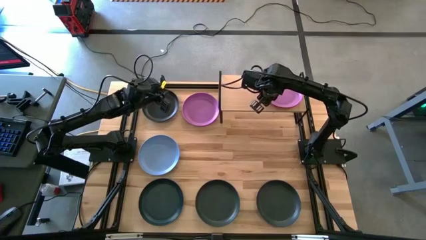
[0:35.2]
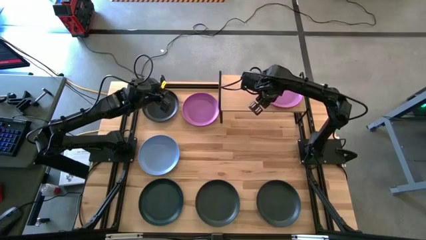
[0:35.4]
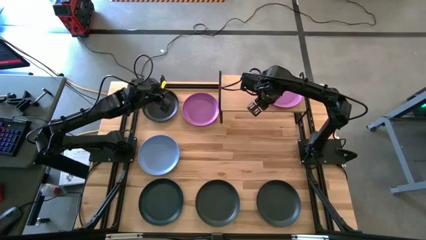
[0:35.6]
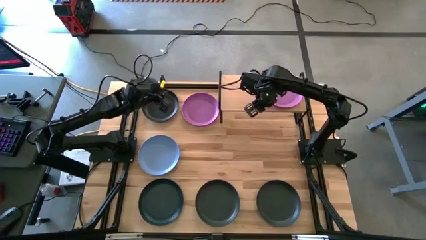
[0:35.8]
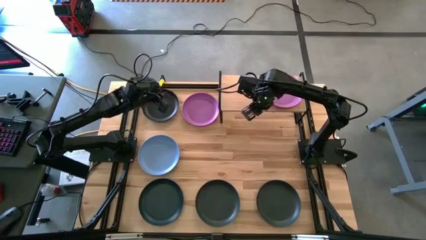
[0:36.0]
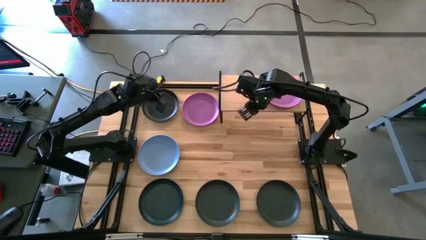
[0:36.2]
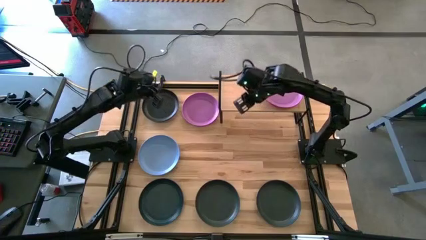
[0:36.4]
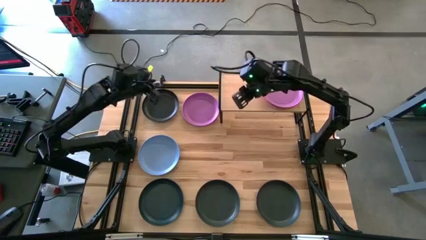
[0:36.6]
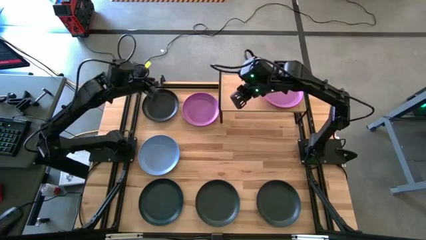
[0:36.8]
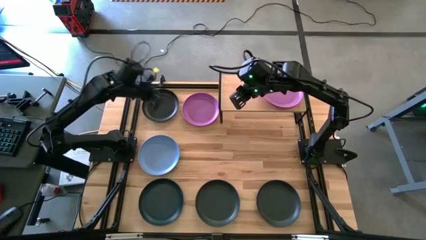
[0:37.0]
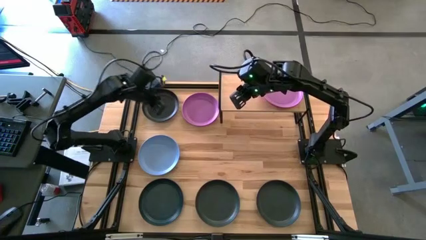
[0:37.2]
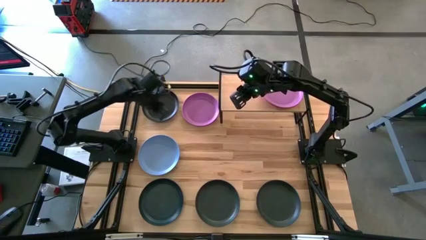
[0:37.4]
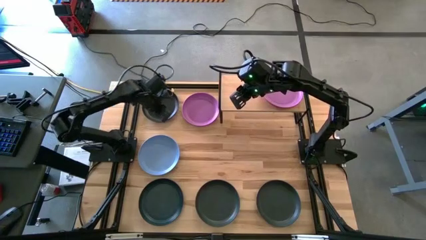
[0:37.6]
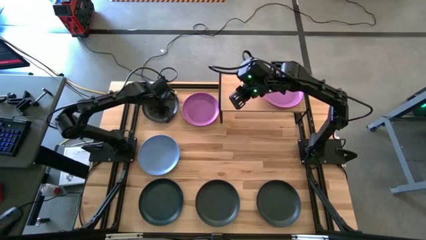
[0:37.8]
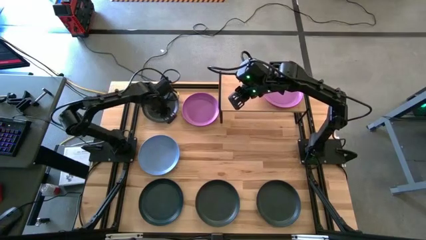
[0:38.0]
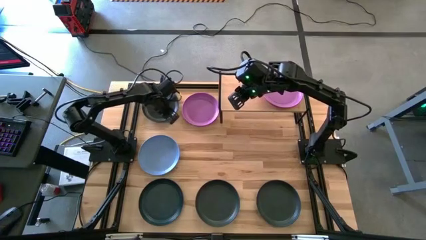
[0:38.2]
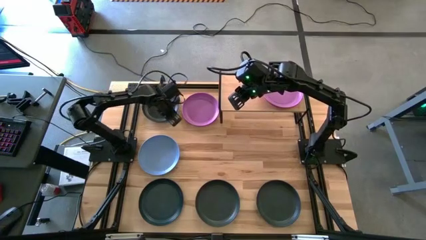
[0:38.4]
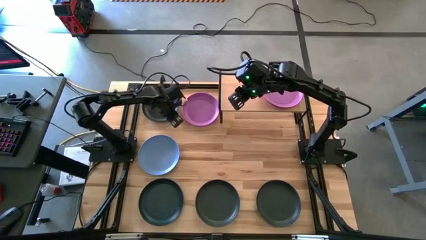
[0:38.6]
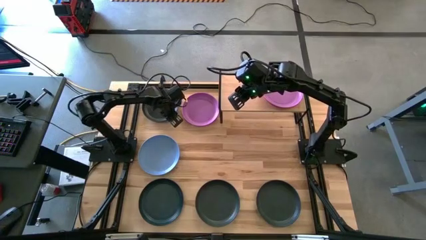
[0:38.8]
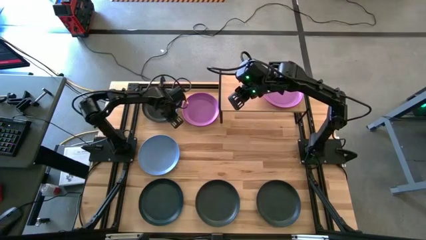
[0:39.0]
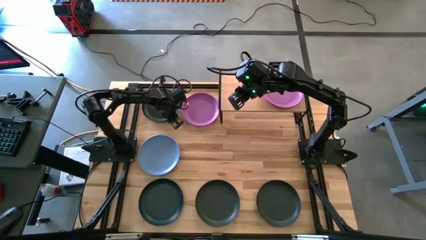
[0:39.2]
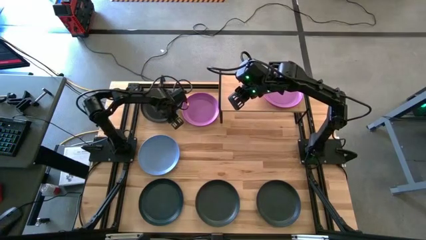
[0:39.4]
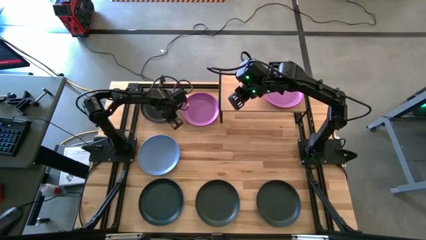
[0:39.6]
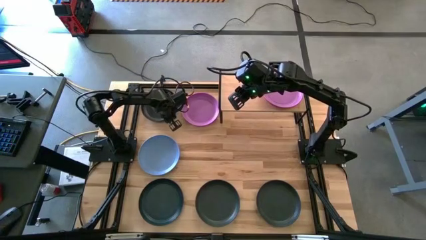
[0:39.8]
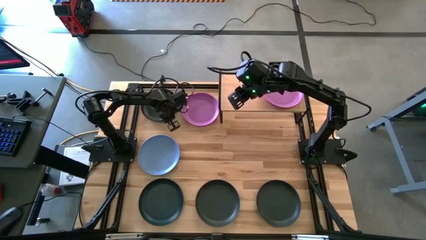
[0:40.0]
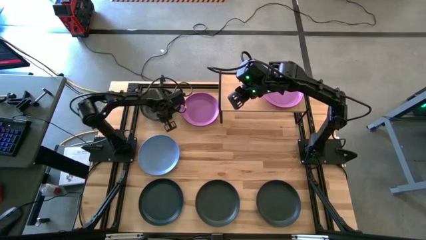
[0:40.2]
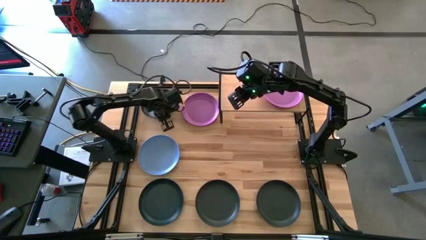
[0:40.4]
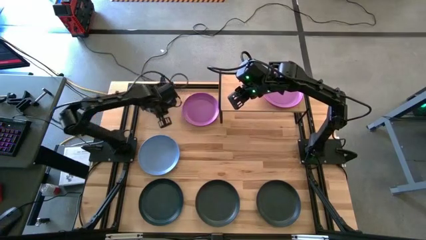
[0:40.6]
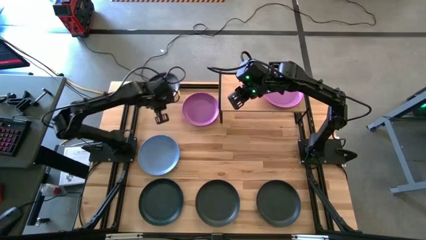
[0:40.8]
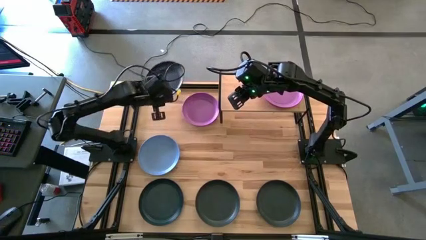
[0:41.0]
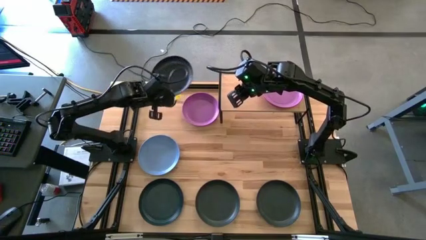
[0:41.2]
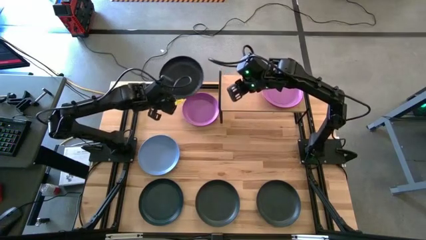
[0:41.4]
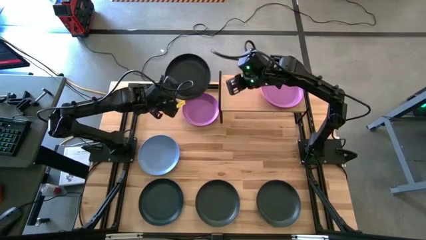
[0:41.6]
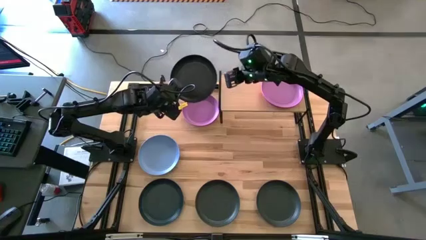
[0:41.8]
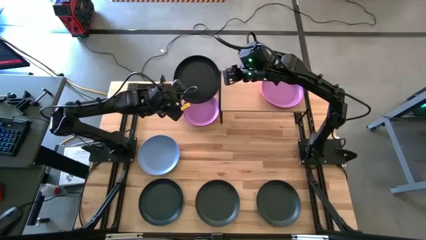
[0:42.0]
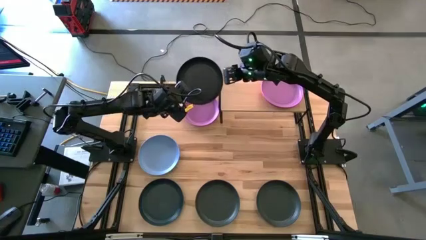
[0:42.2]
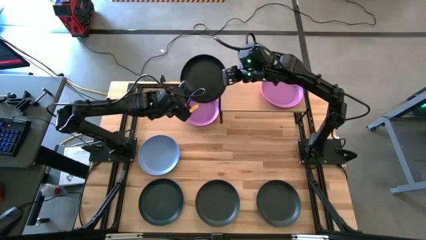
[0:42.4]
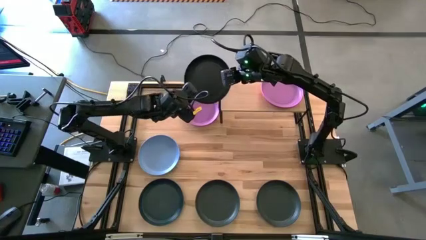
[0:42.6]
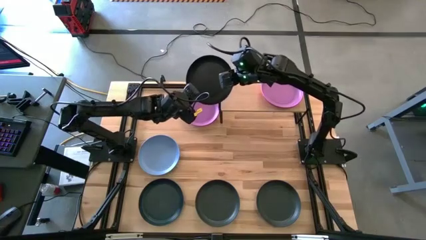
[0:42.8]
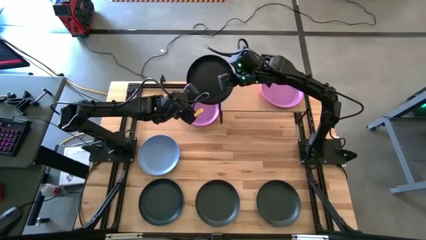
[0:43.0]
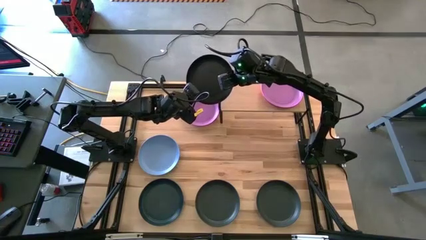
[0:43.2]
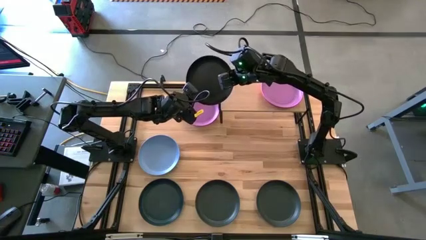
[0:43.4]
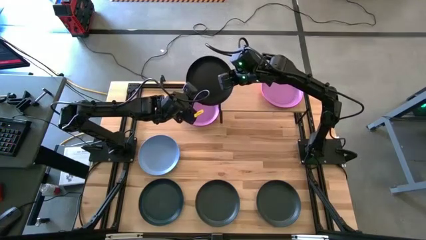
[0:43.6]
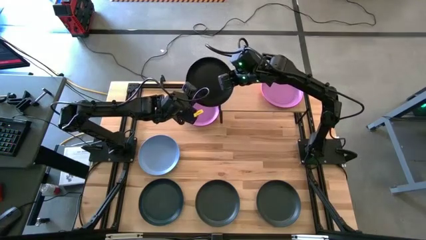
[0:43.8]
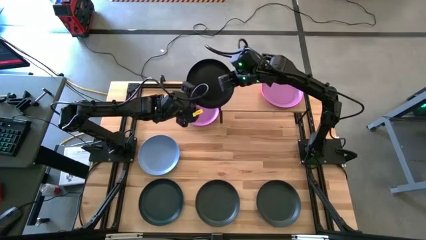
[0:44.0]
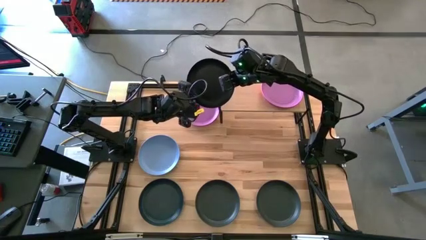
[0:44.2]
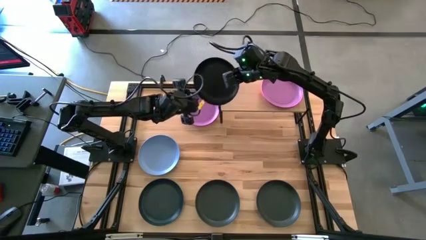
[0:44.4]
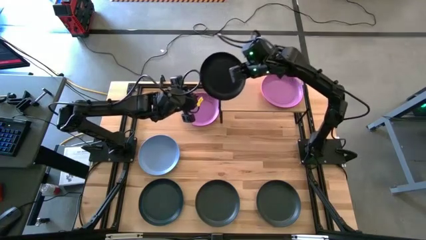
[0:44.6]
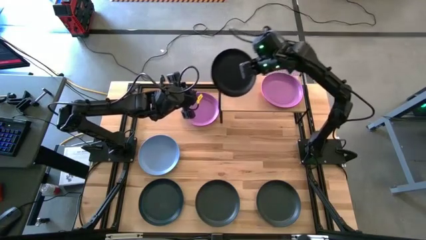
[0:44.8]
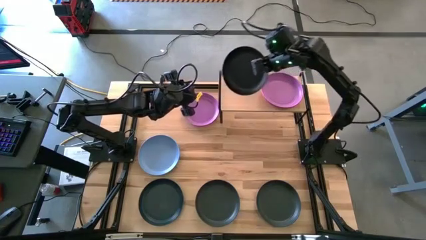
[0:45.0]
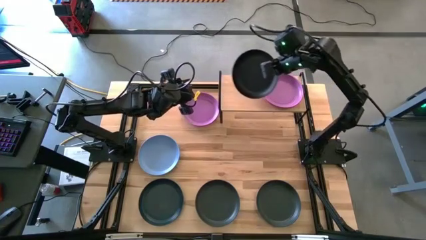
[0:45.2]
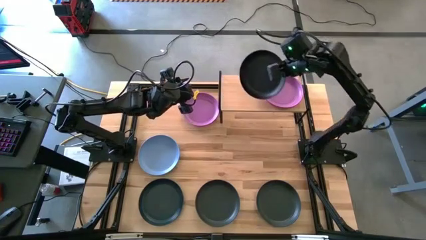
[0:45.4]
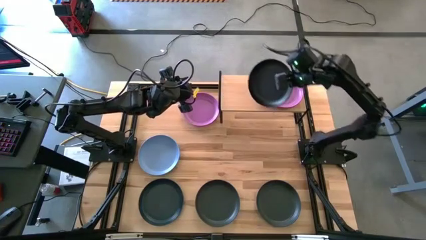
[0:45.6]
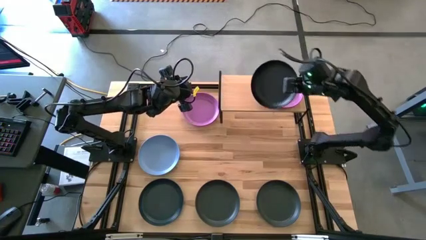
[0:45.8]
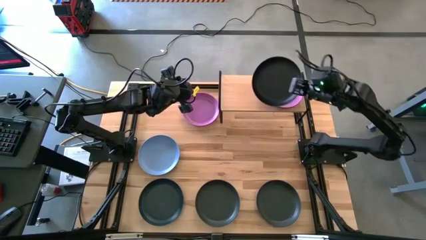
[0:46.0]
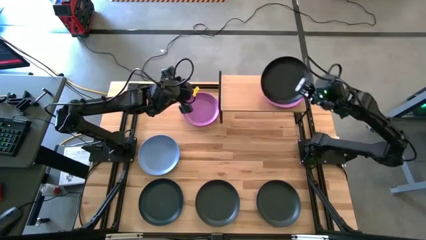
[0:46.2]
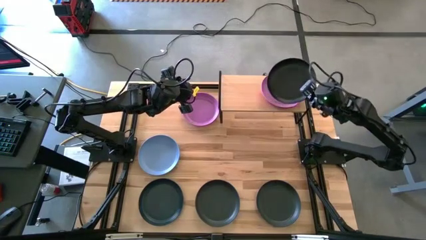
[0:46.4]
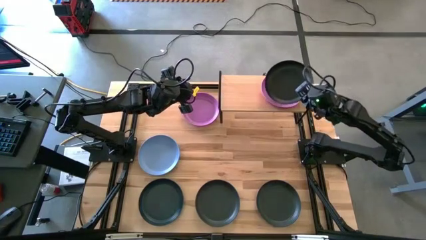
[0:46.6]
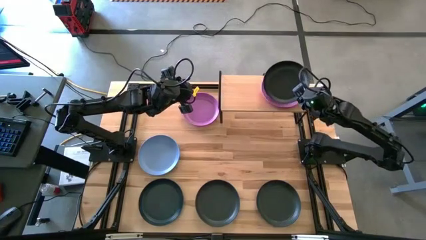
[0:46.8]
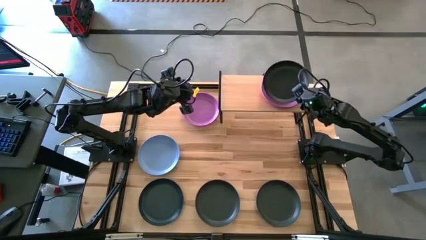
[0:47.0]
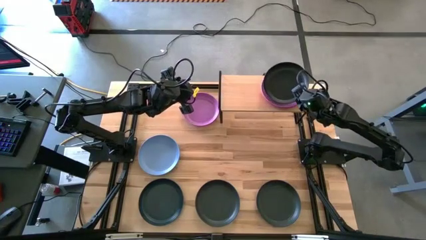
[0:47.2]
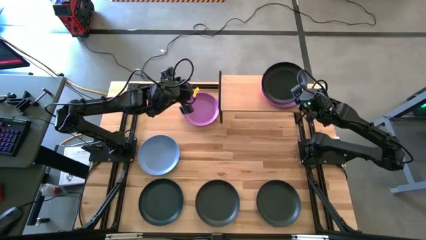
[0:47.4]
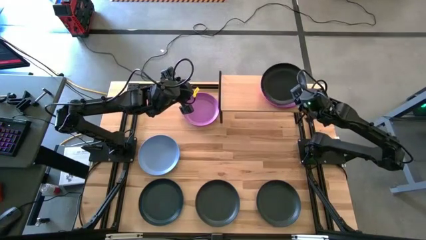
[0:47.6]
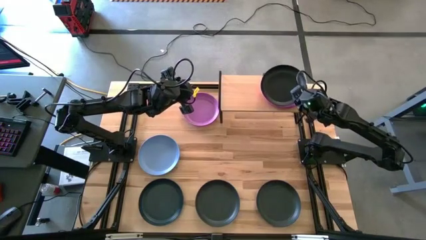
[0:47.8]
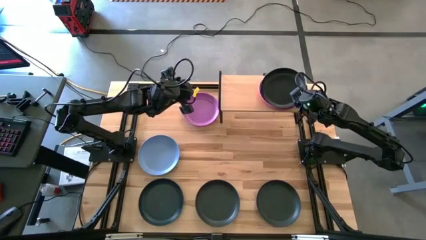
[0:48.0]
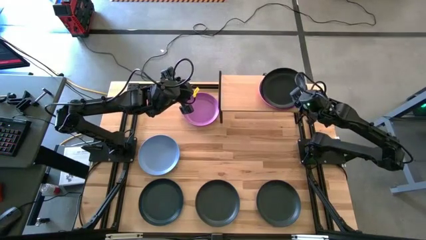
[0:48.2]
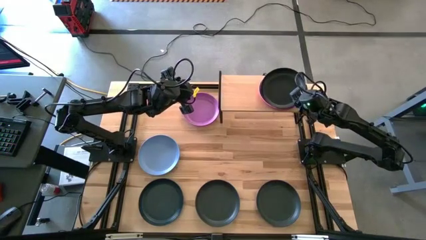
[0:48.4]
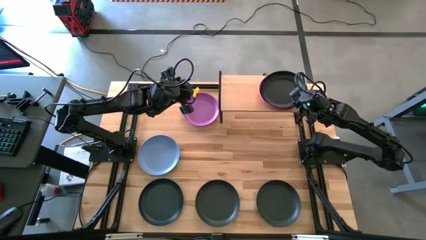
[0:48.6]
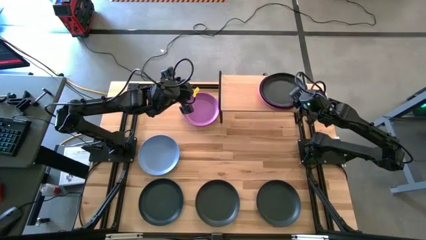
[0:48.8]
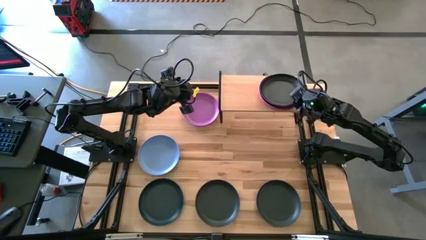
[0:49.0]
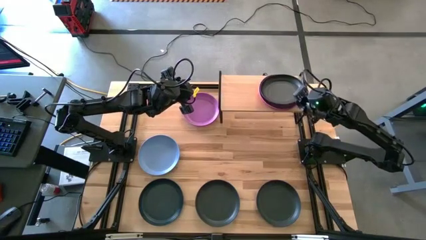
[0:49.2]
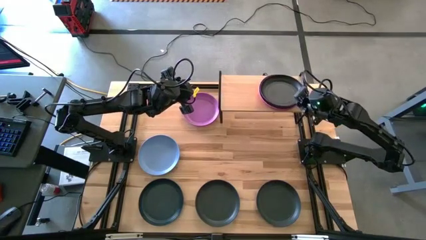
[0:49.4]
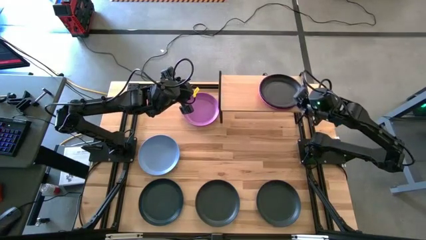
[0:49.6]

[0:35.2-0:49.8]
Task: Place and stack plates onto a shelf
Stack the top black plate on top of the violet plate on the shelf
